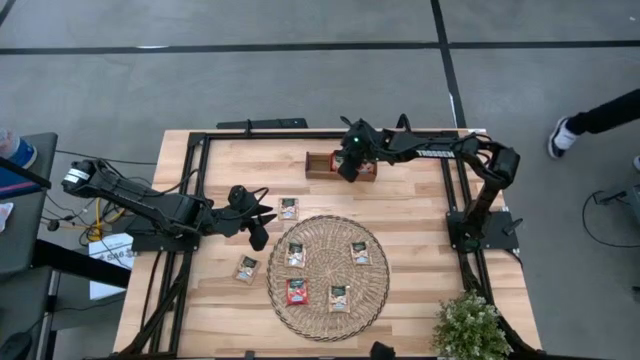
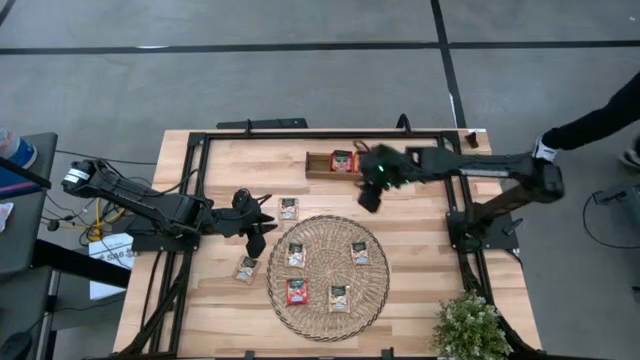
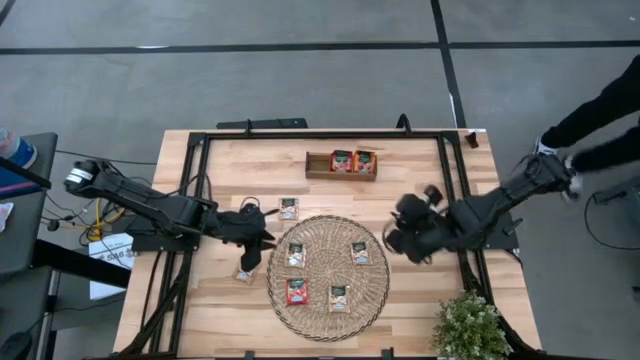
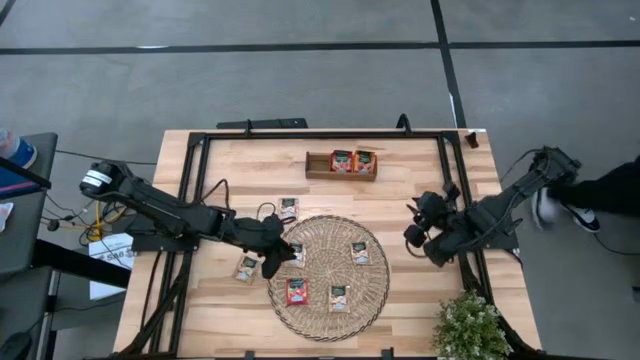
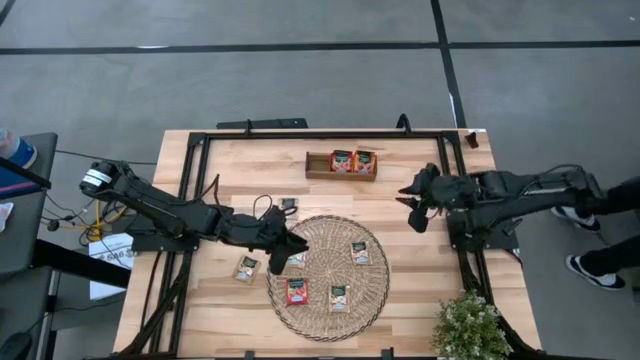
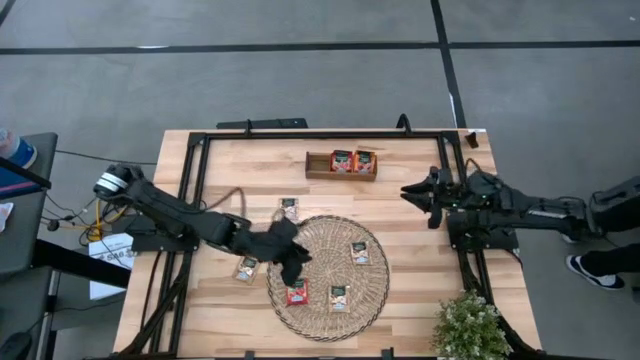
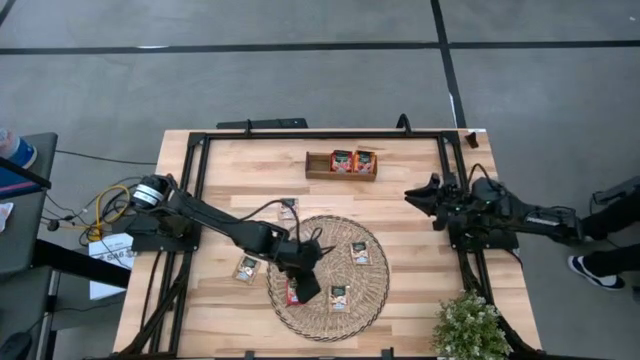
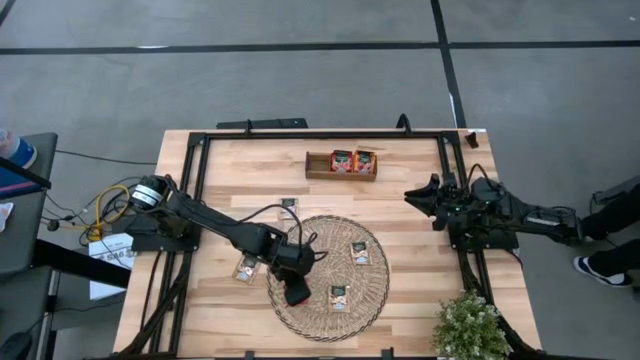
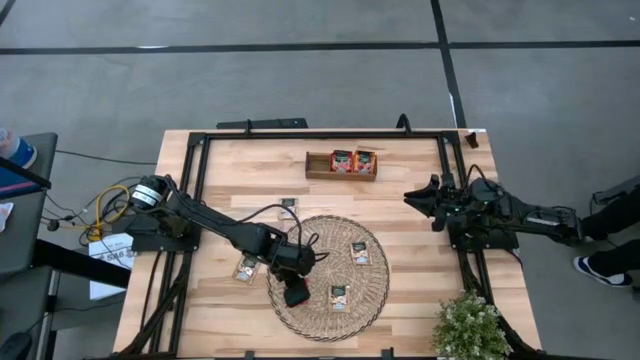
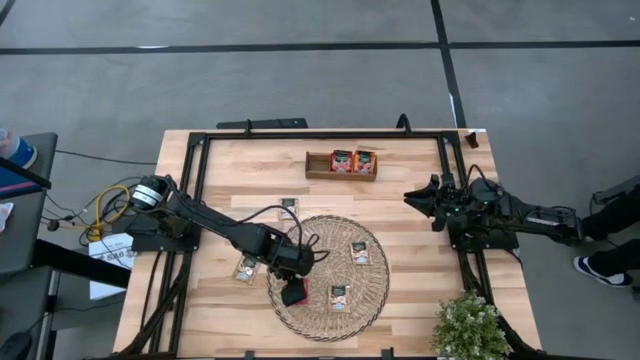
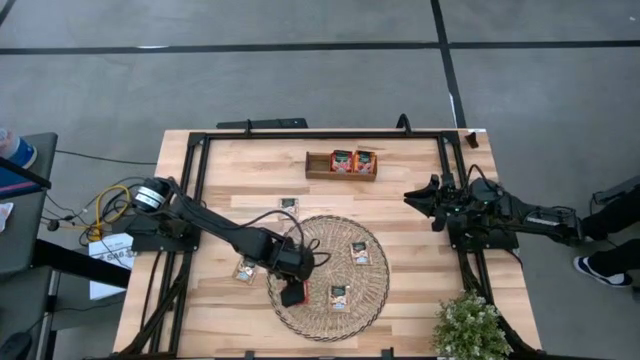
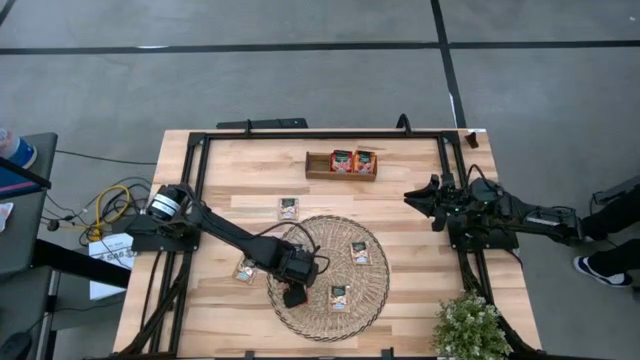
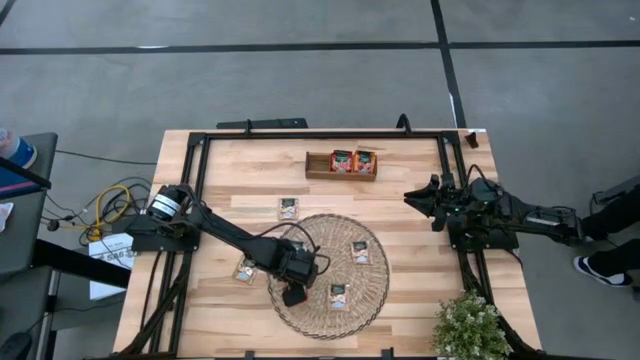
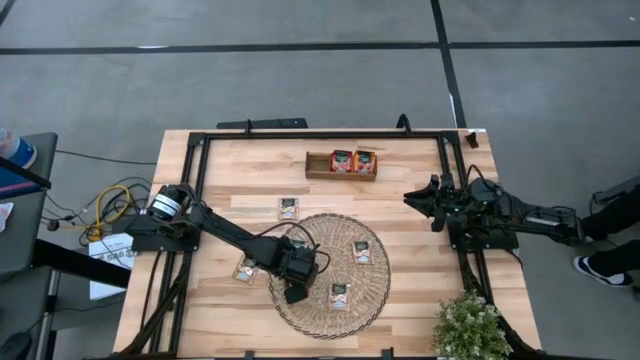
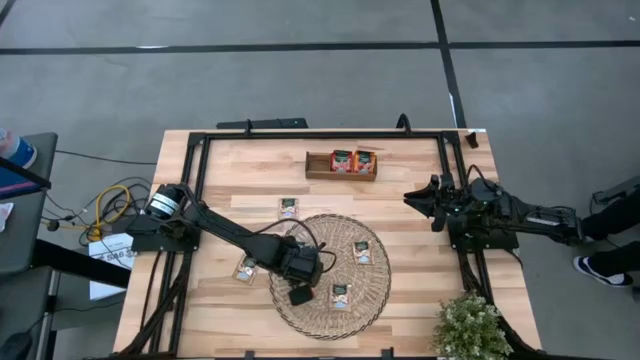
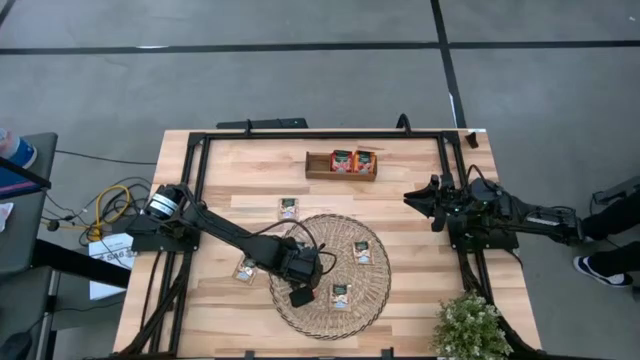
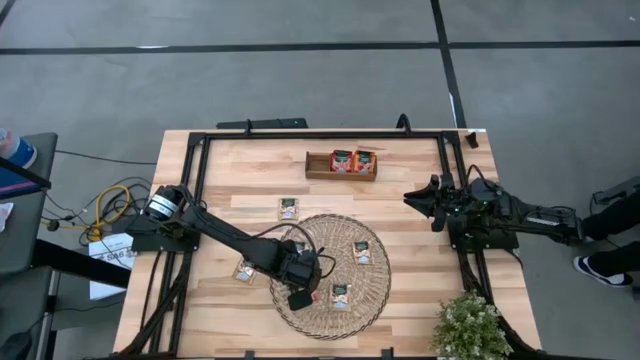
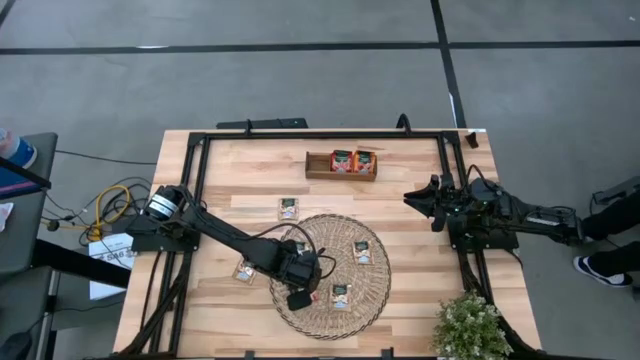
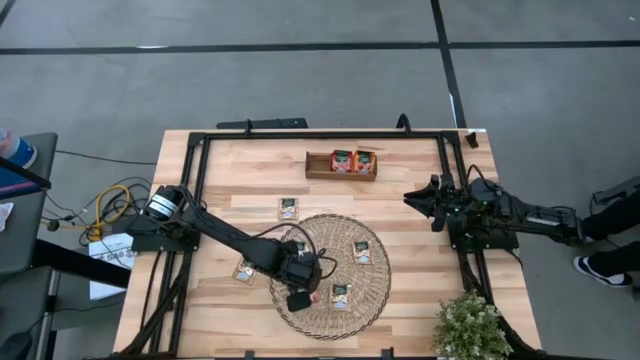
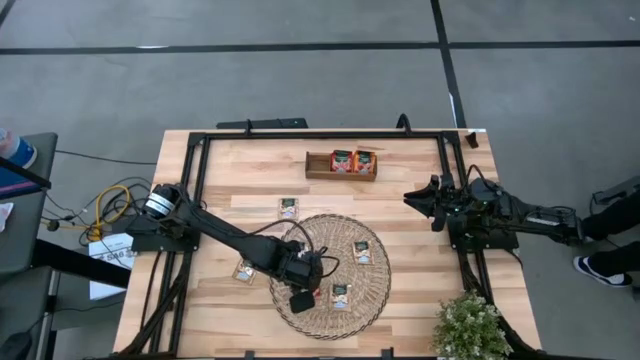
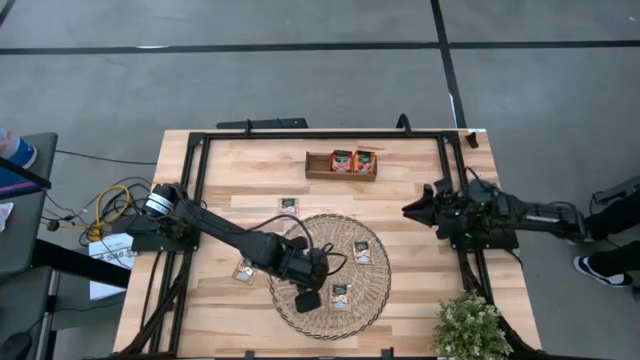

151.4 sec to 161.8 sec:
Task: Pick & Place Tea
Put the red tea bag into the middle section of the wooden organizer

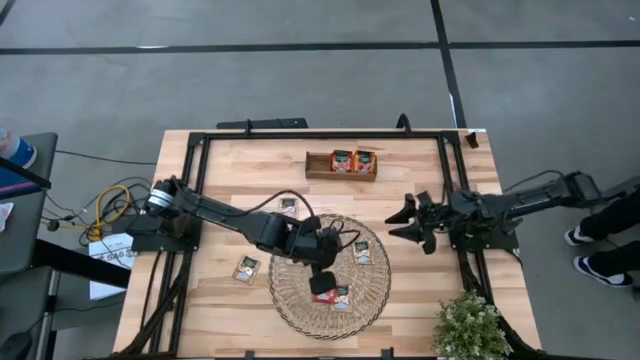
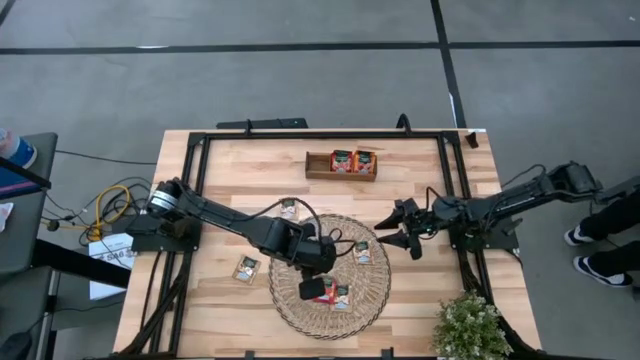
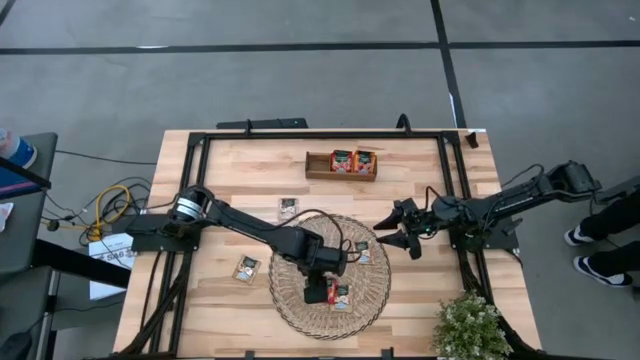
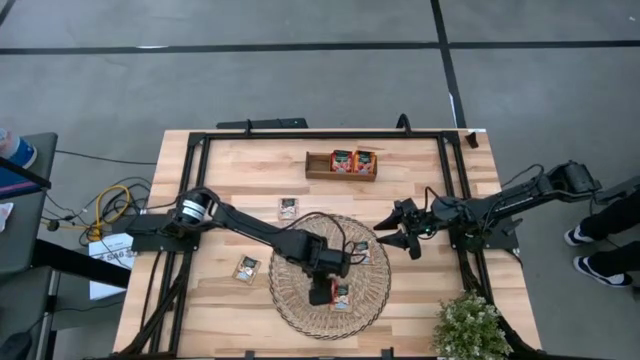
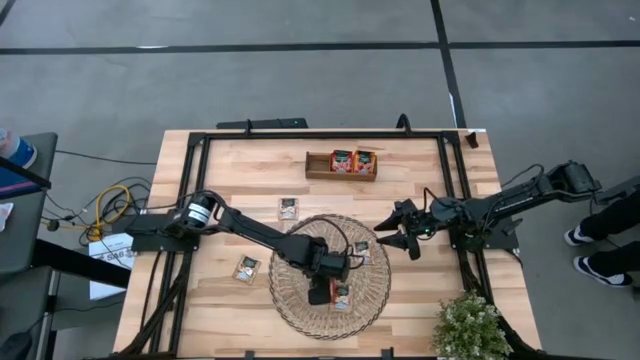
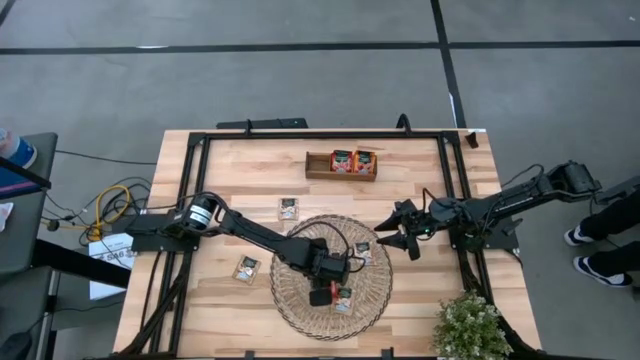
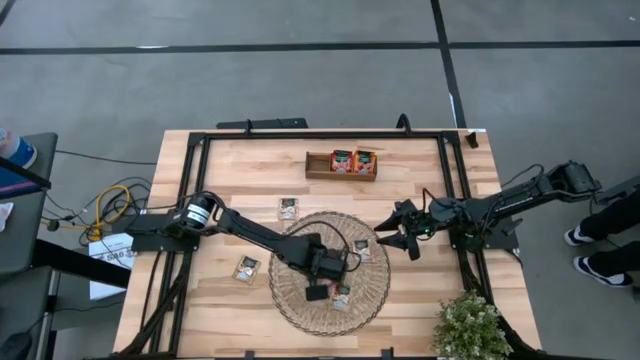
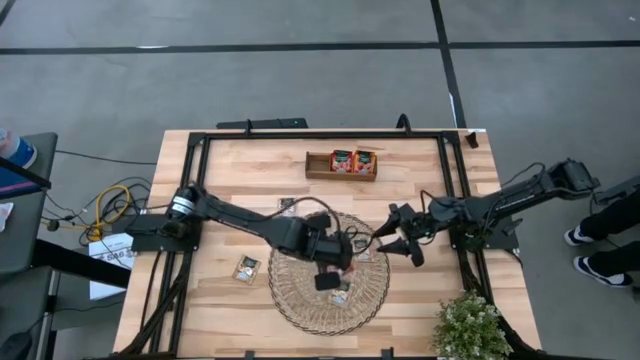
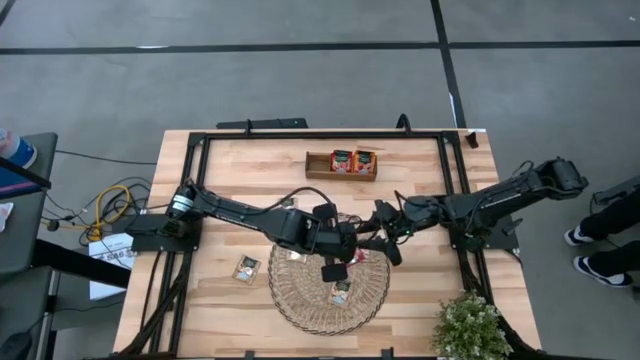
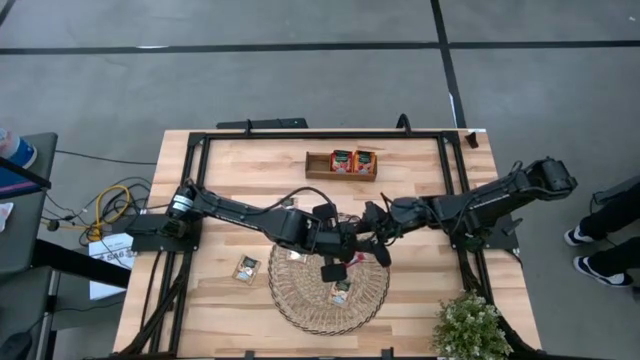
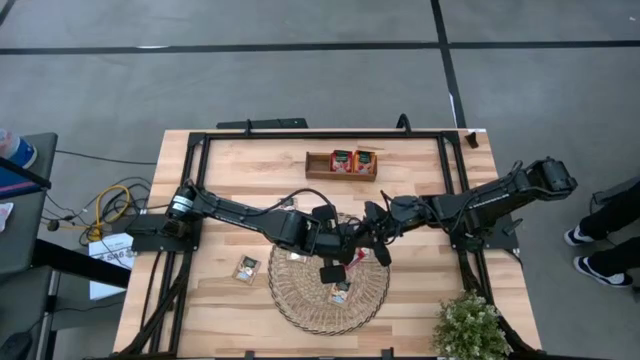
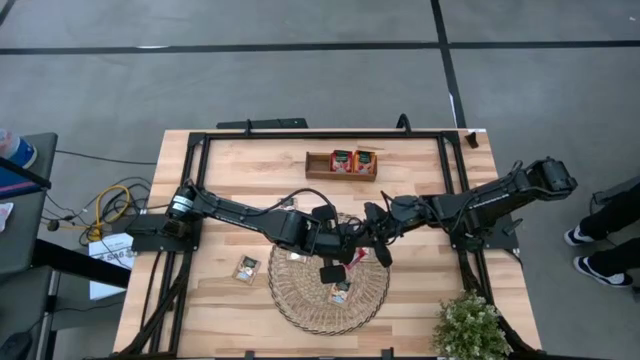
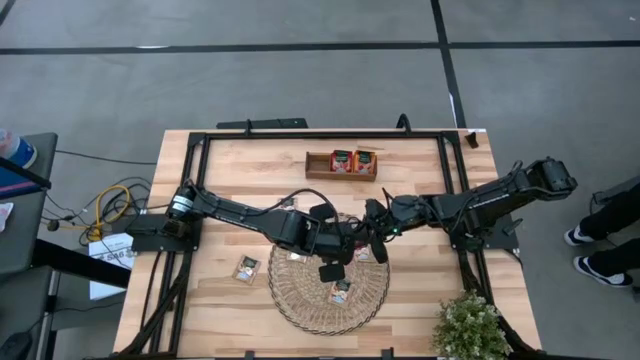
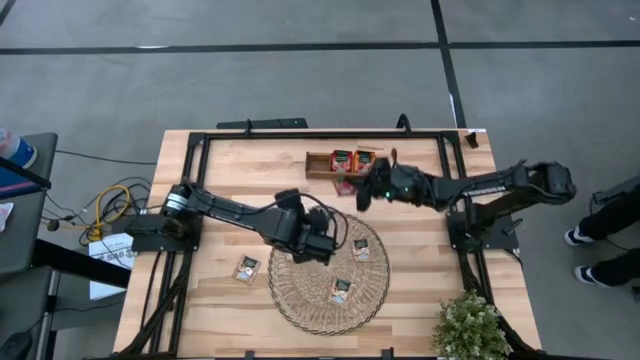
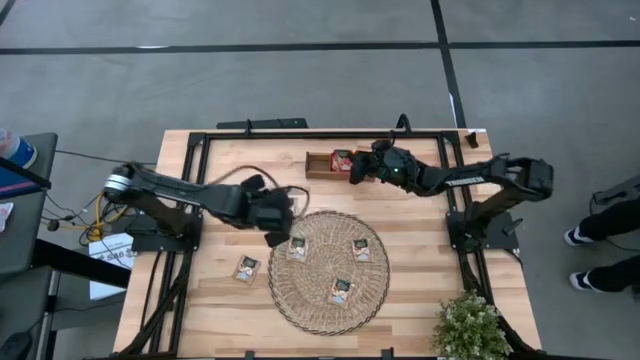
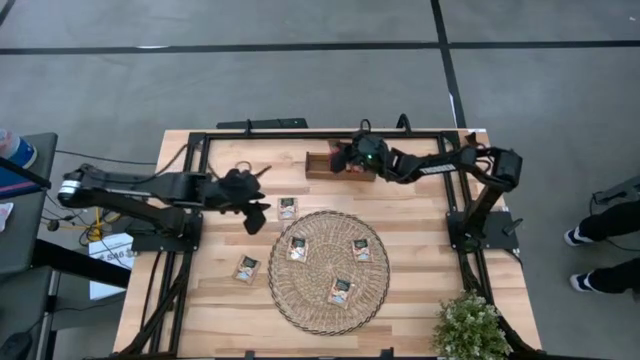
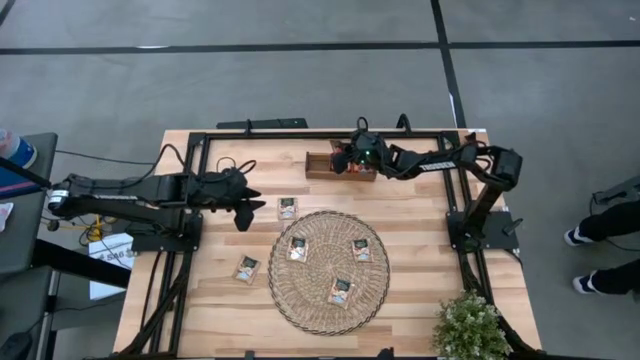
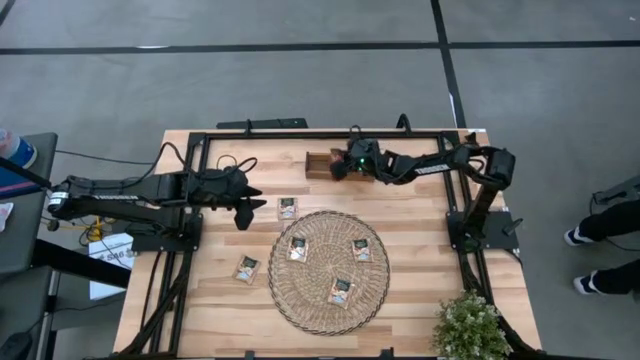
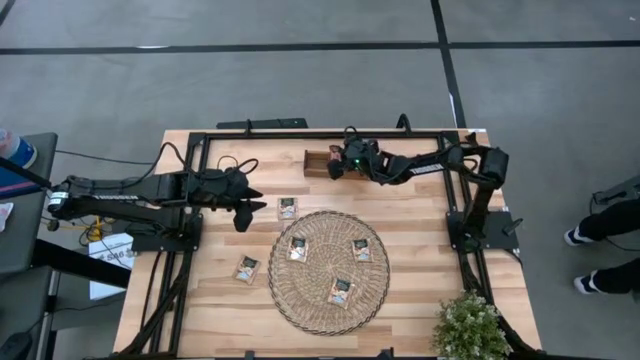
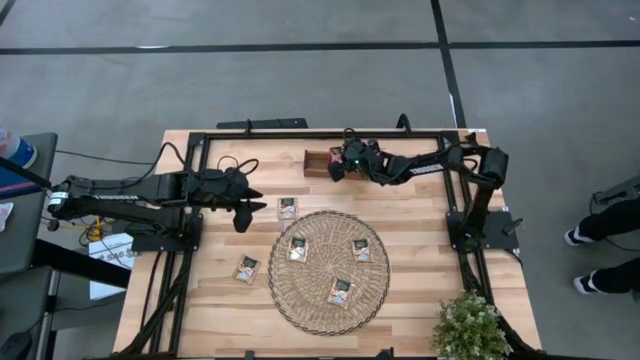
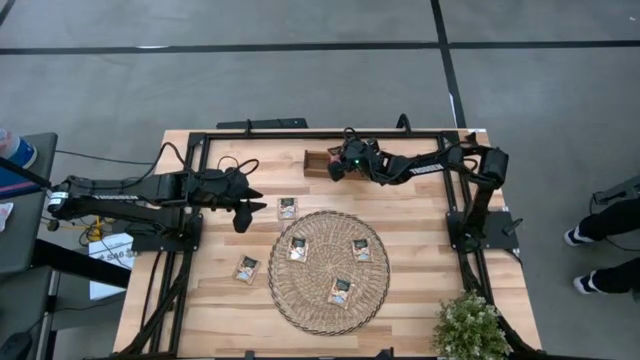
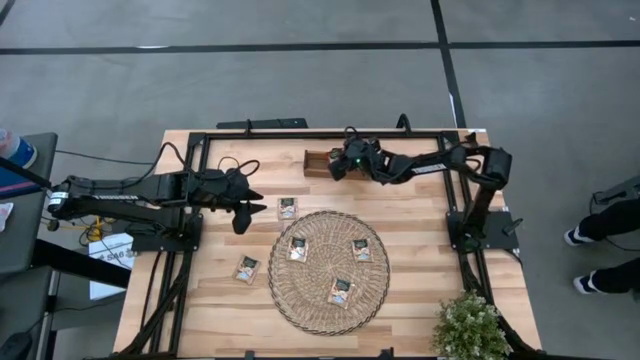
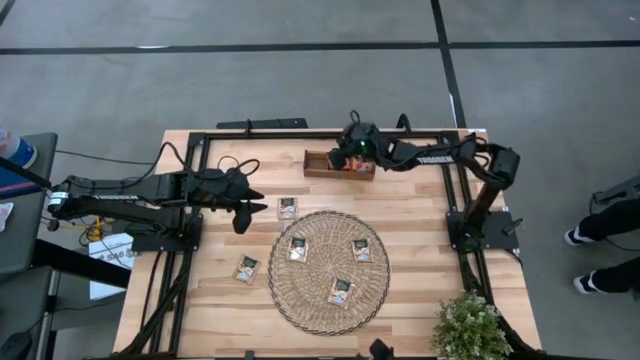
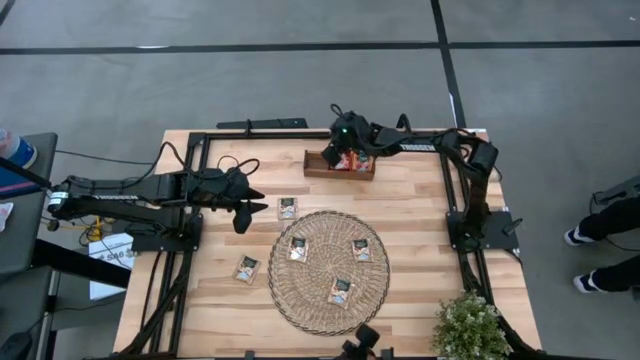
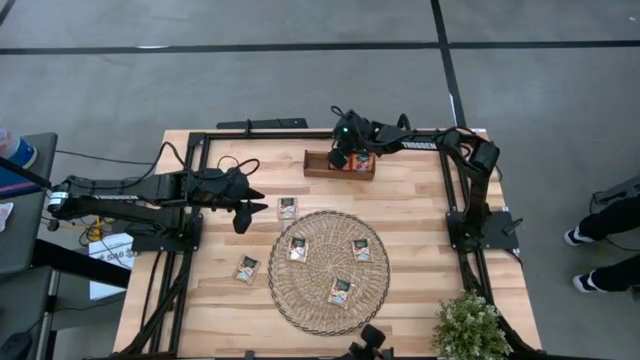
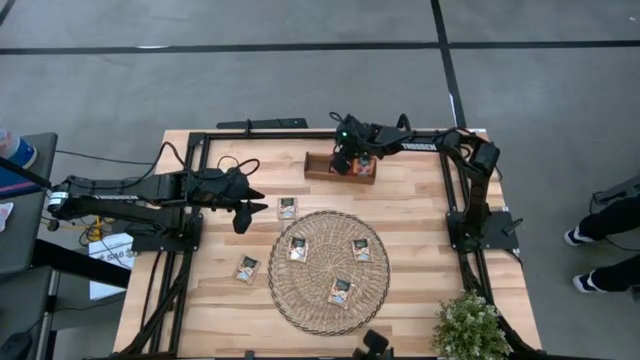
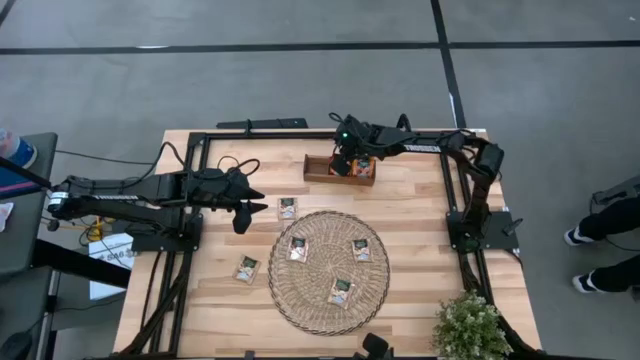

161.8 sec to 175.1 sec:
Put the red tea bag into the middle section of the wooden organizer
